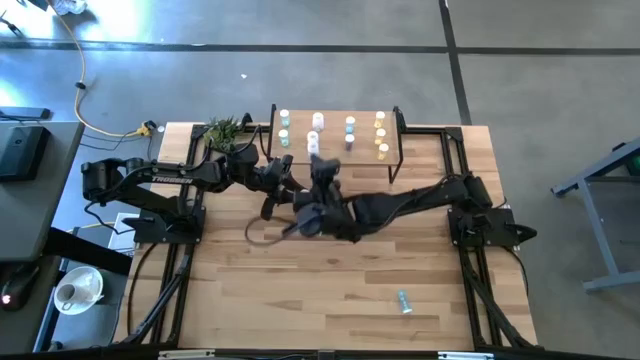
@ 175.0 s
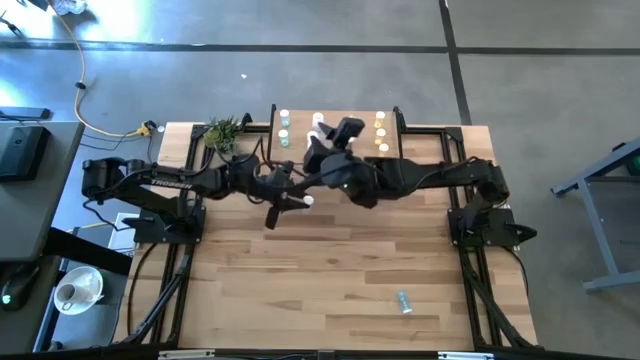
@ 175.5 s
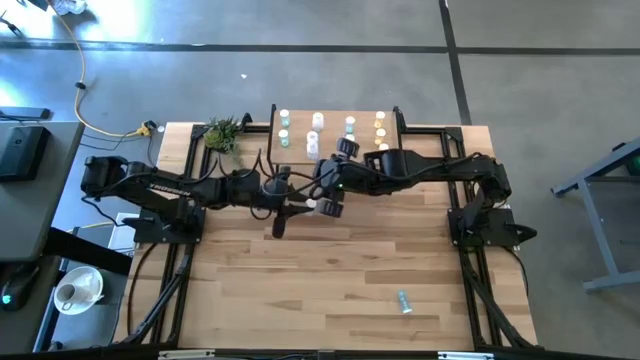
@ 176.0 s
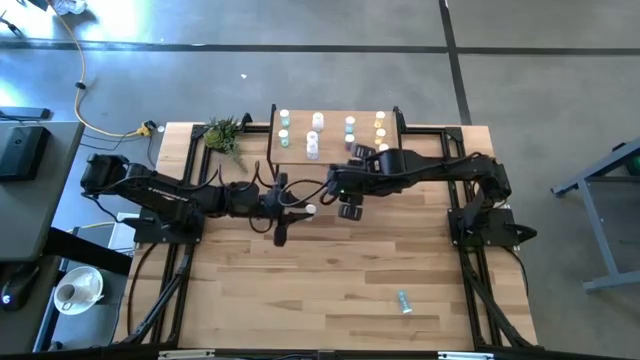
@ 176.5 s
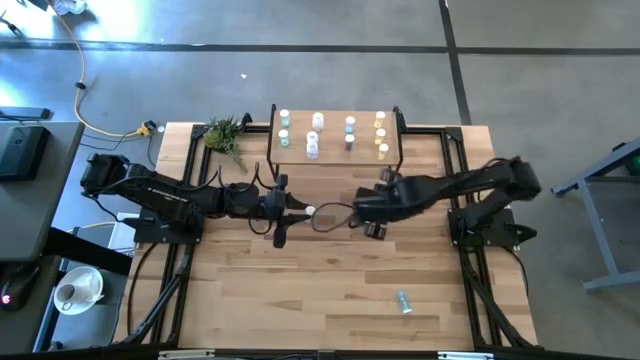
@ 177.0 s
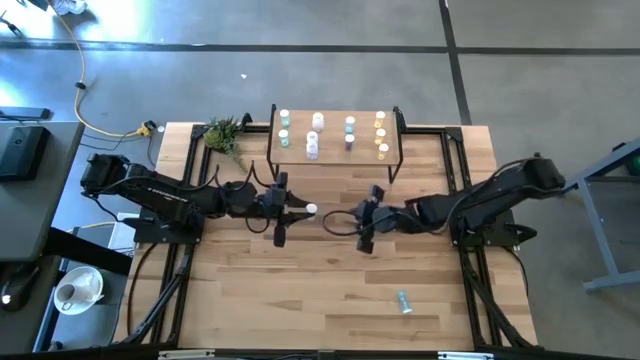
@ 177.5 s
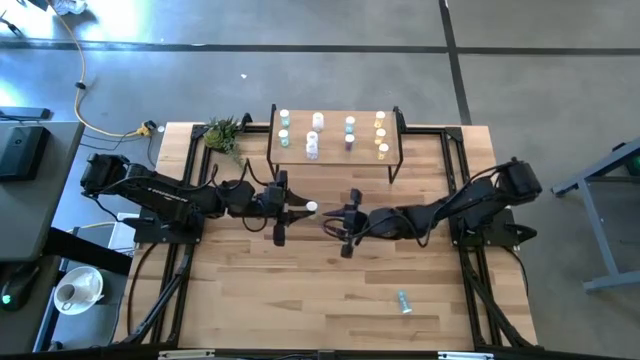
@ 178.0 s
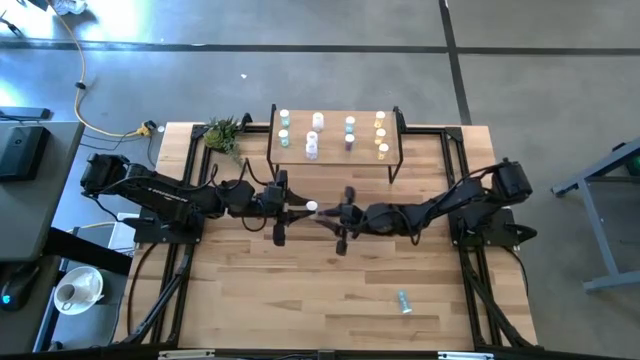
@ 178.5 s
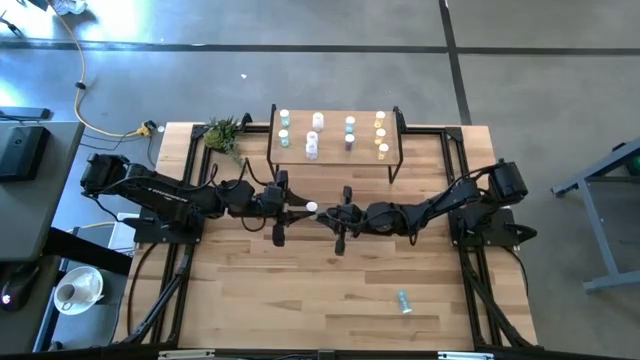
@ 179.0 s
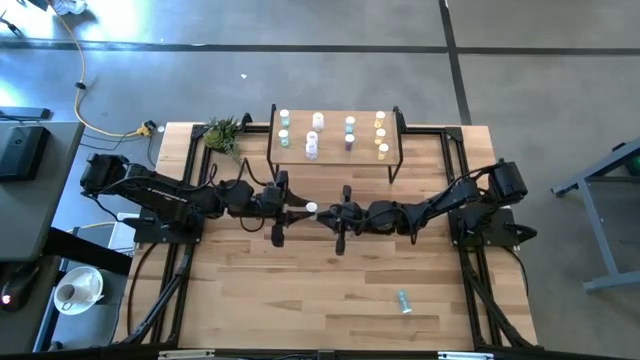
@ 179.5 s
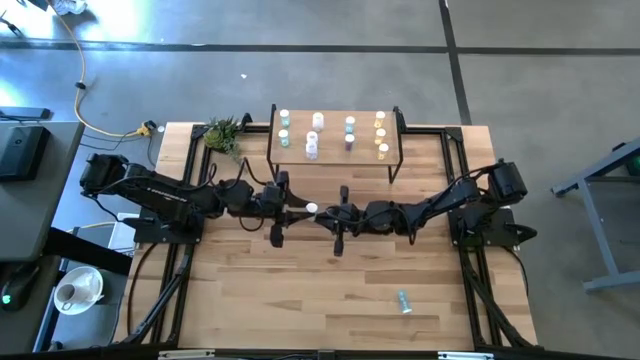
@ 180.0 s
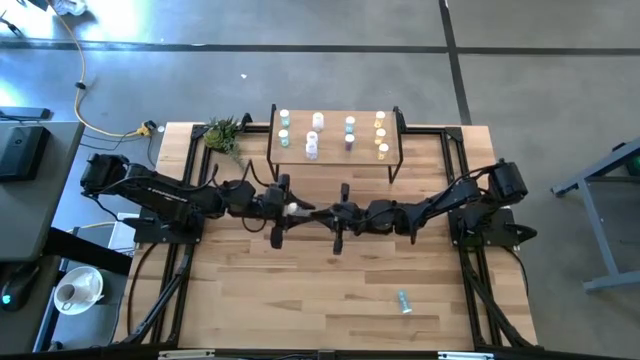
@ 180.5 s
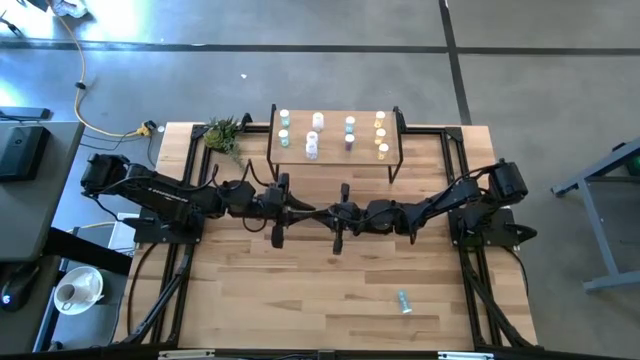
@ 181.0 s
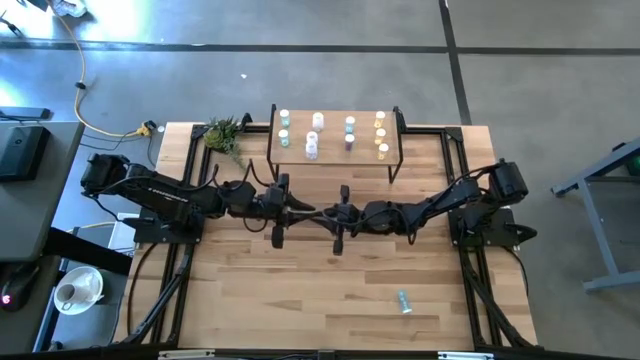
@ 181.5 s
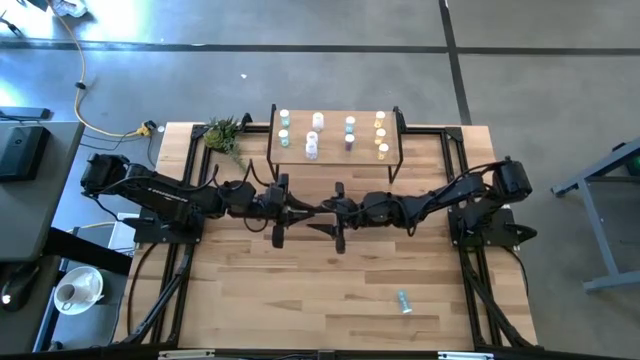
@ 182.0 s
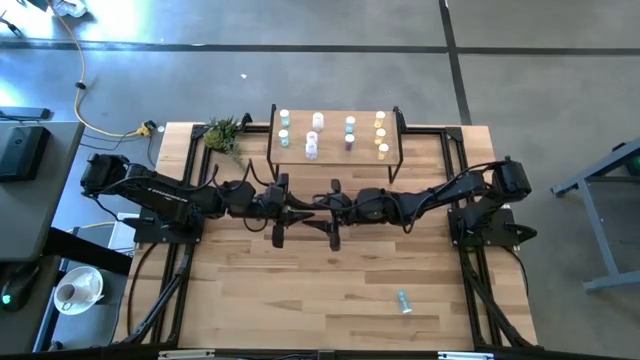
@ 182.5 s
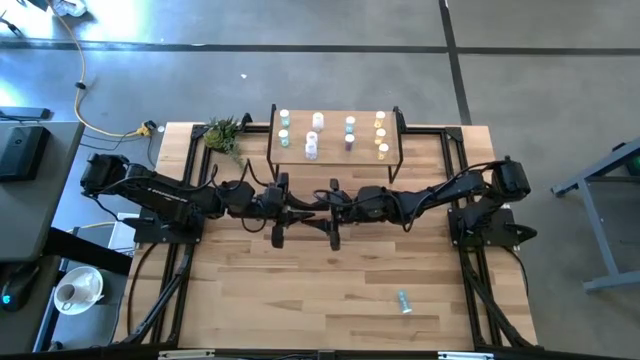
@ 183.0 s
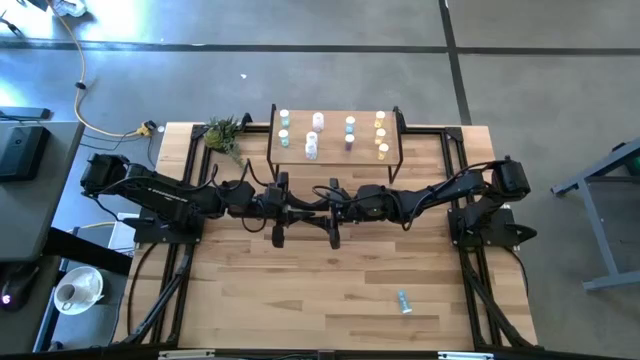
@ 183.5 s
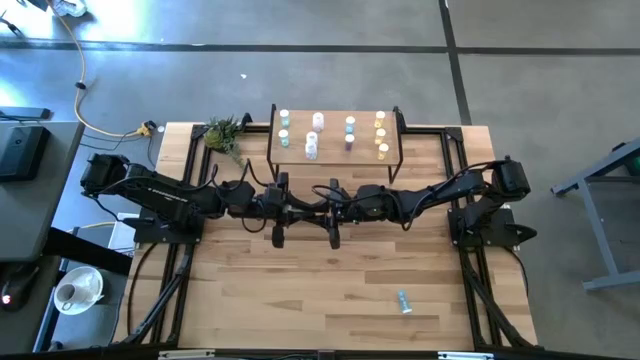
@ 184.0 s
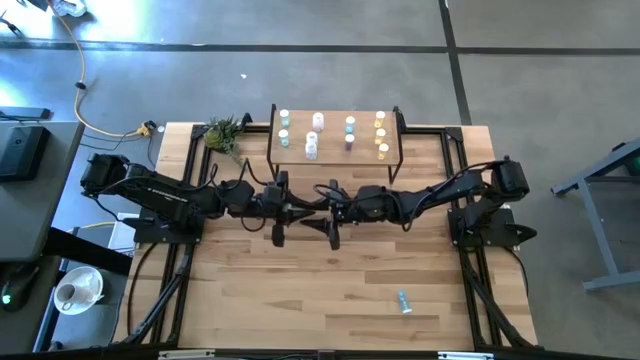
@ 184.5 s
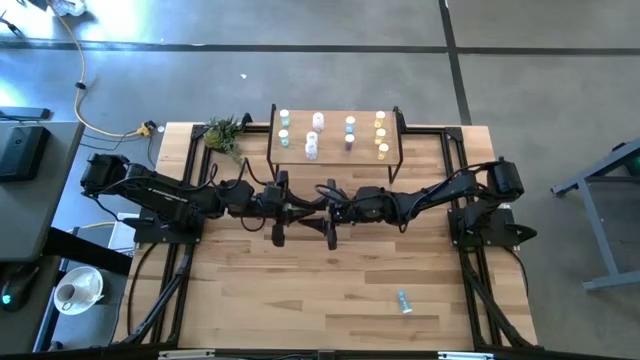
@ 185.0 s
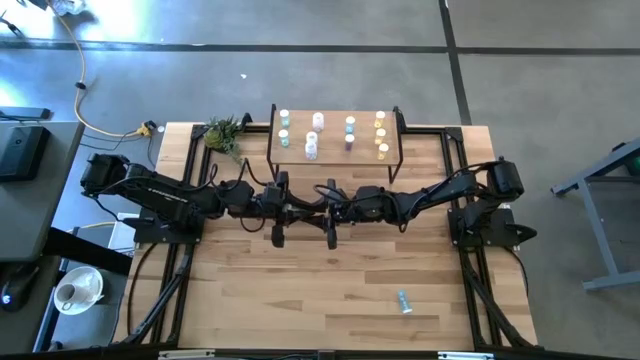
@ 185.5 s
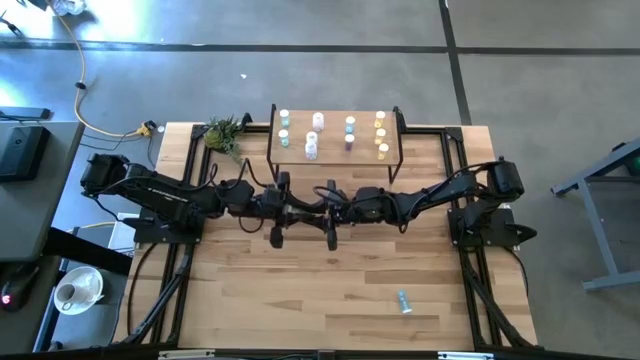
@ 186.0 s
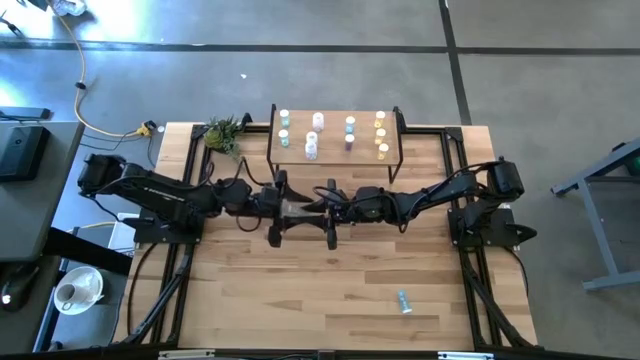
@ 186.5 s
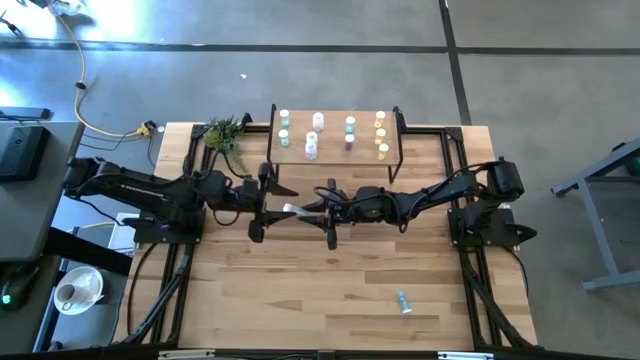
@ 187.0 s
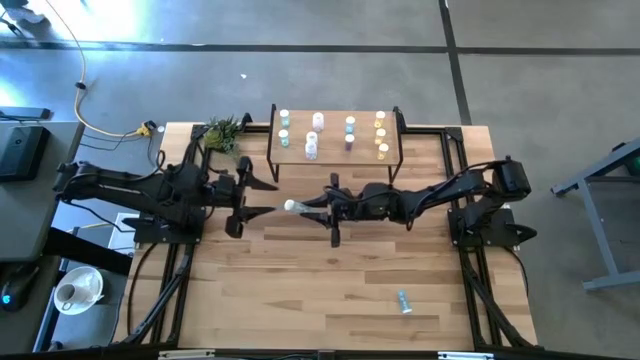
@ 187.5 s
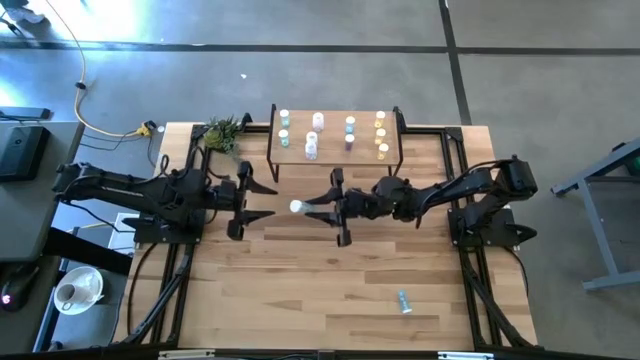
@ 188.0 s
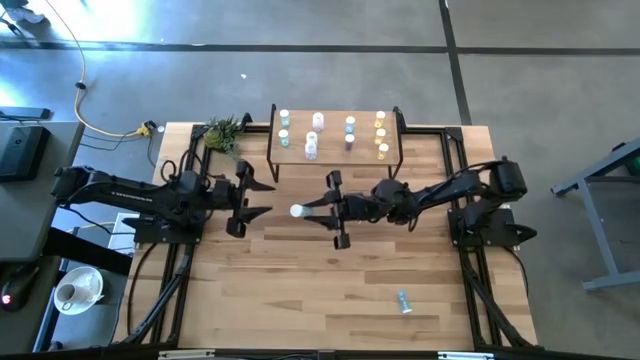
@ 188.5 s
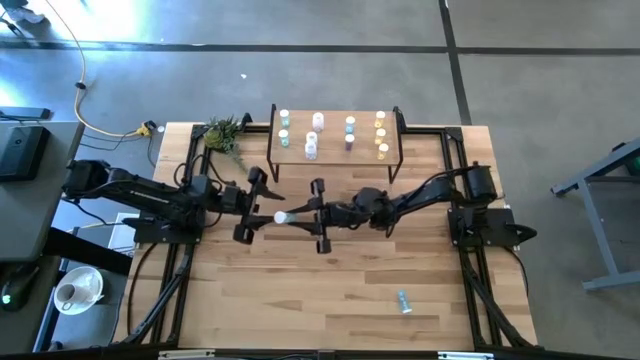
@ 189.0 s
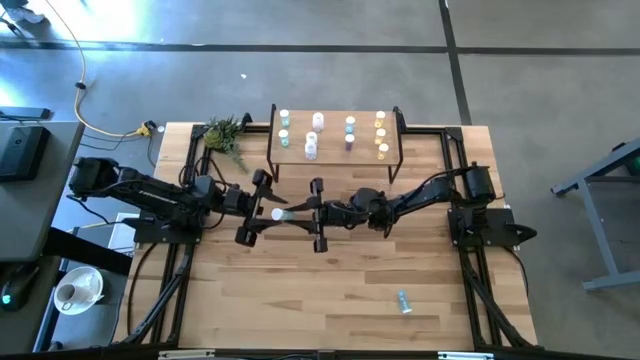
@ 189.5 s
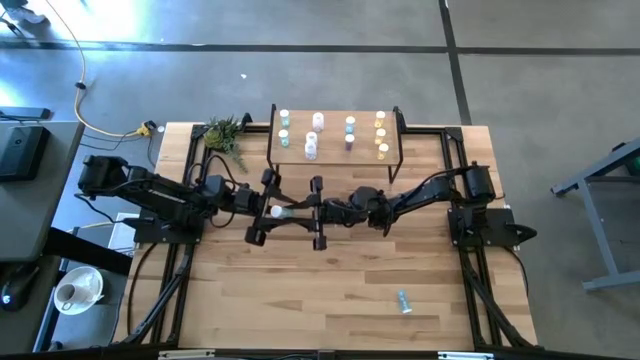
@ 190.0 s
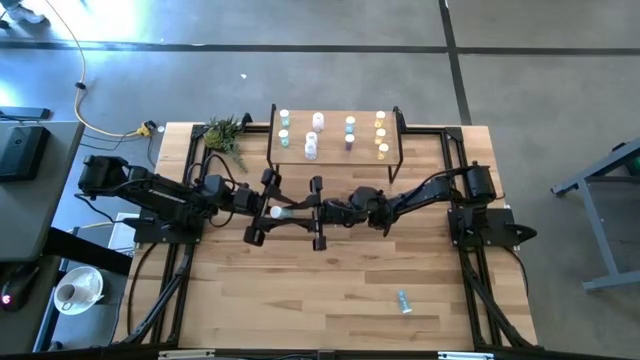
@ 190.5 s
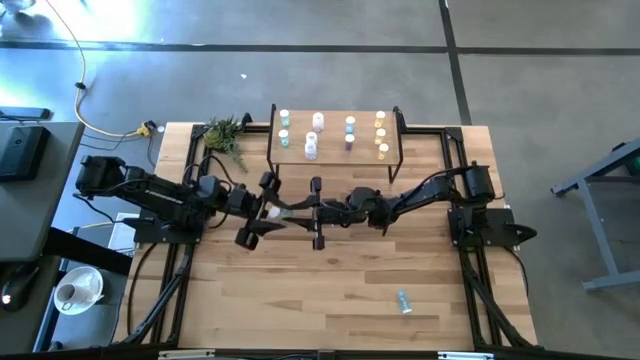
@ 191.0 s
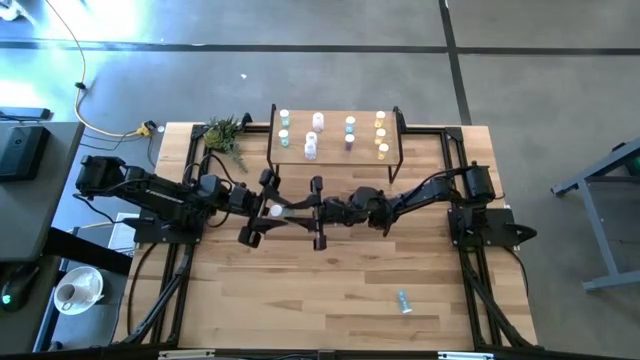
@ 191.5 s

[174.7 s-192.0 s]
Task: Pick and place medicine bottles onto shelf by color
Put the green pill bottle on the shelf aligned with the other green pill bottle

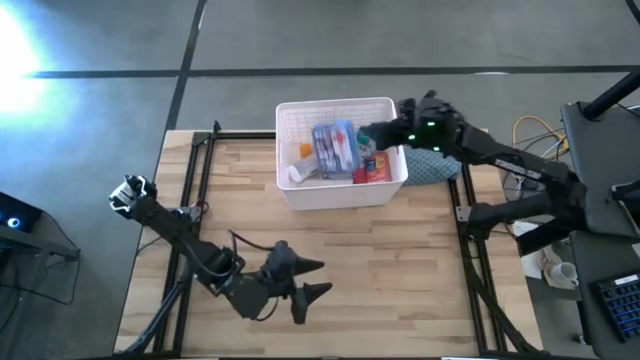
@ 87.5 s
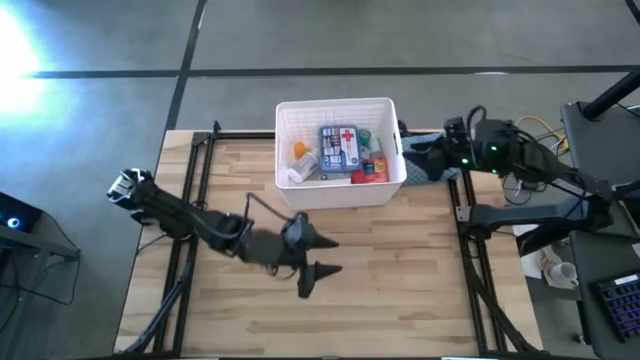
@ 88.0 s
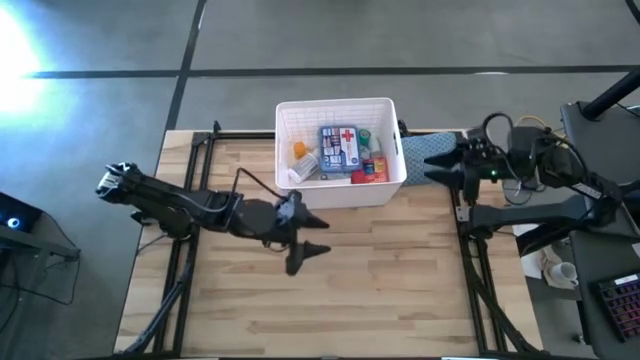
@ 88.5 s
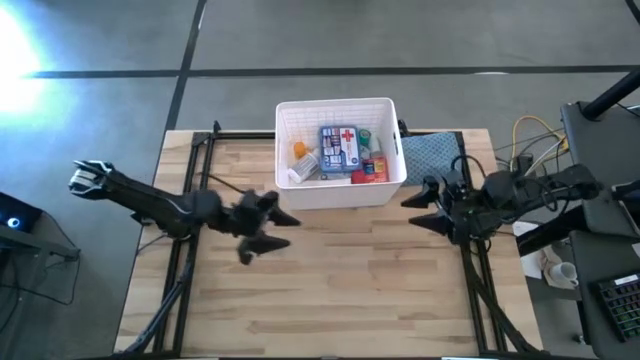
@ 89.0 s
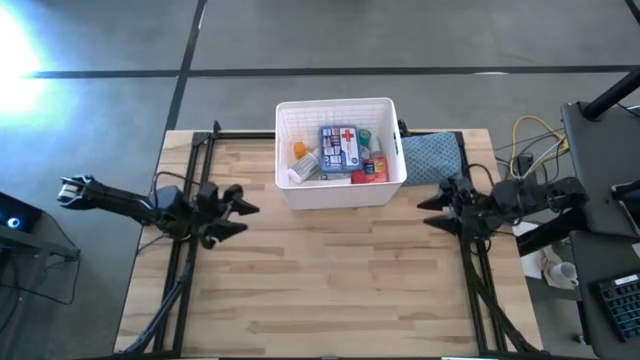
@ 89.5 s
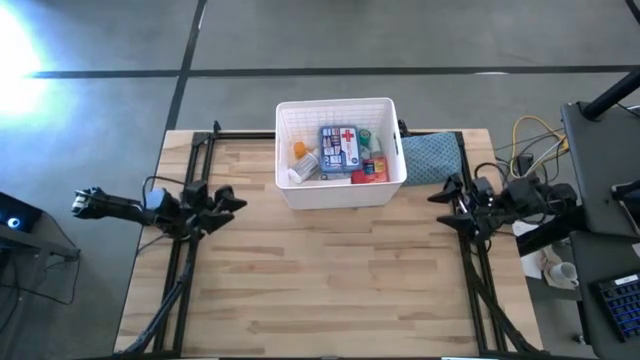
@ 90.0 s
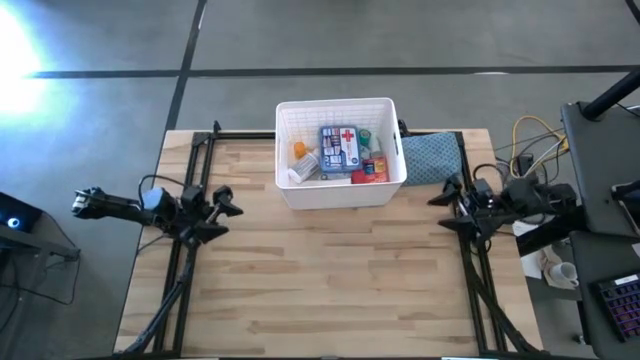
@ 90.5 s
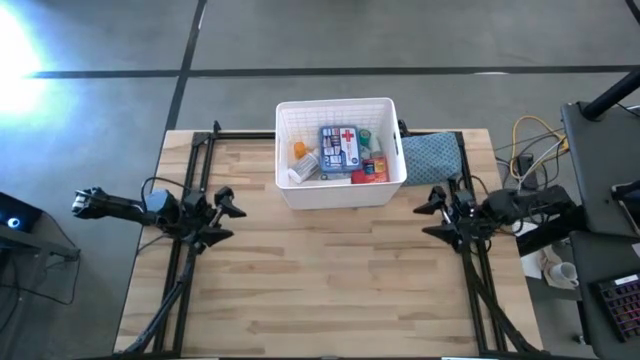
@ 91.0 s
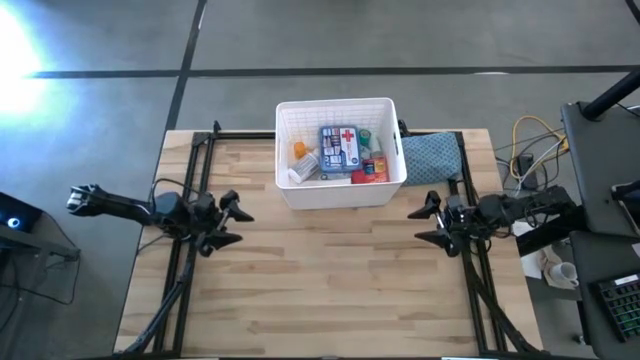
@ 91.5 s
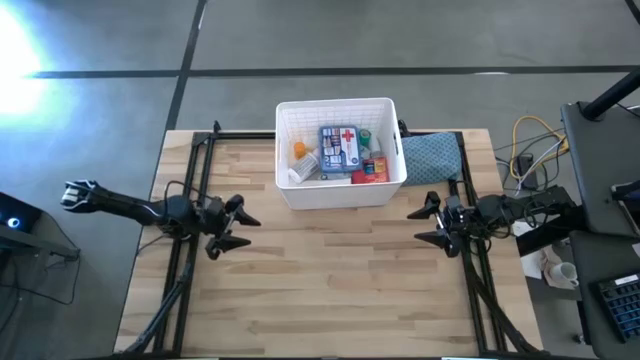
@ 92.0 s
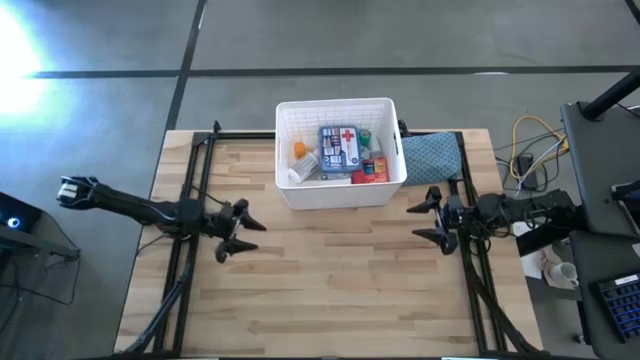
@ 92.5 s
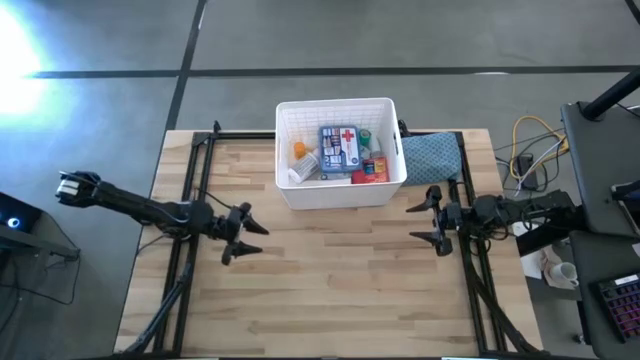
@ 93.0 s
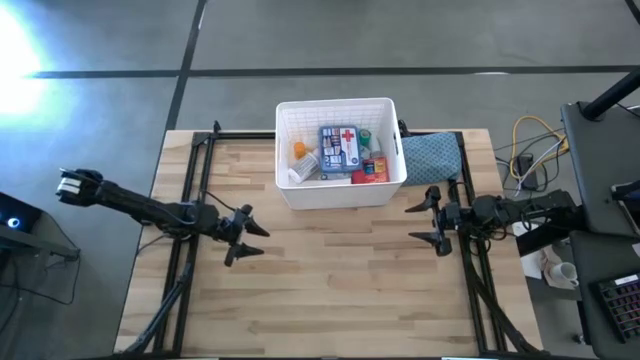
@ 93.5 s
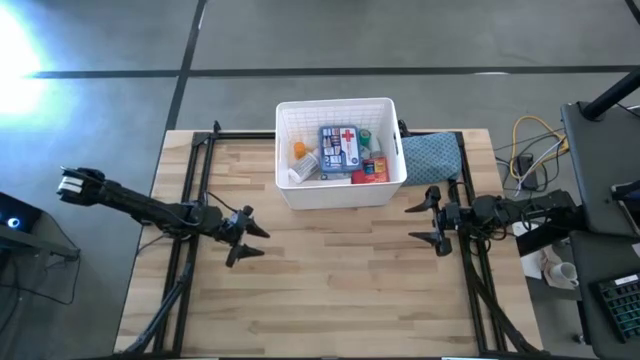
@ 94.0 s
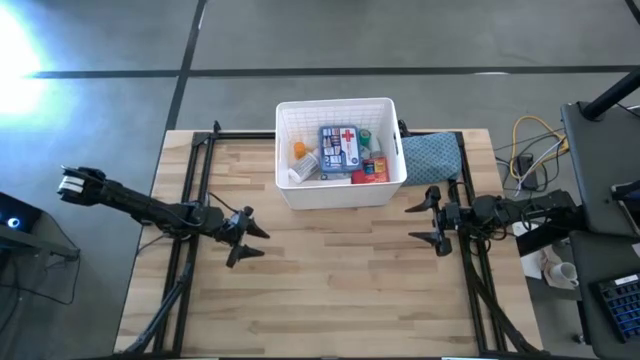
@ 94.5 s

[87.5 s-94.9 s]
Task: Pick & place medical supplies in basket/bin
Return to Home Position
